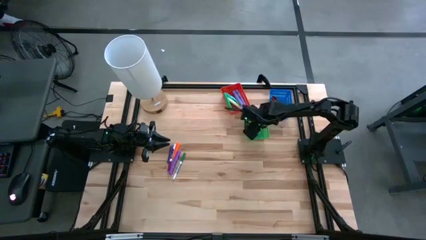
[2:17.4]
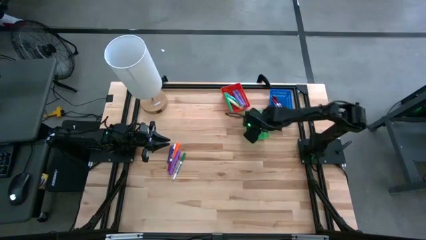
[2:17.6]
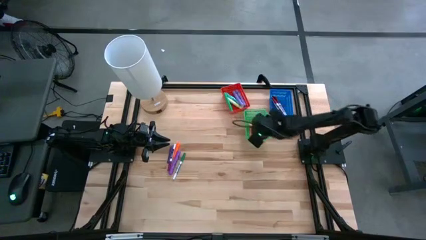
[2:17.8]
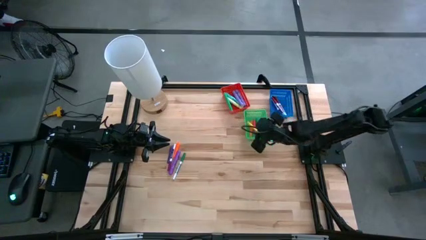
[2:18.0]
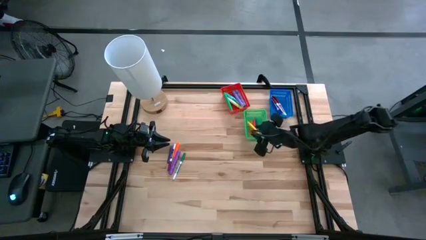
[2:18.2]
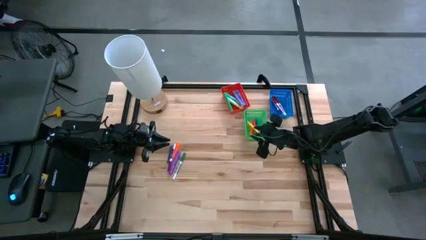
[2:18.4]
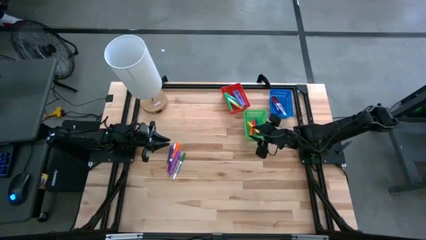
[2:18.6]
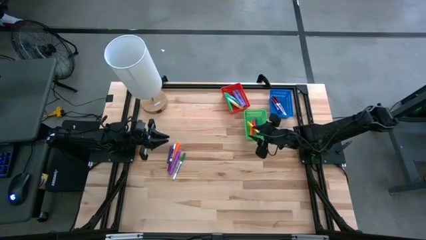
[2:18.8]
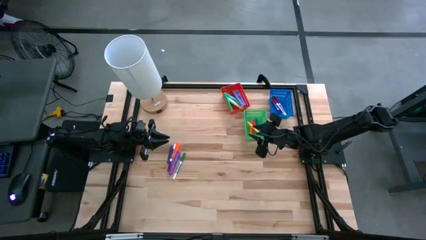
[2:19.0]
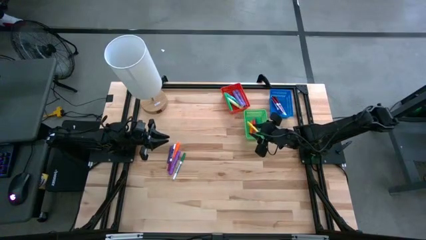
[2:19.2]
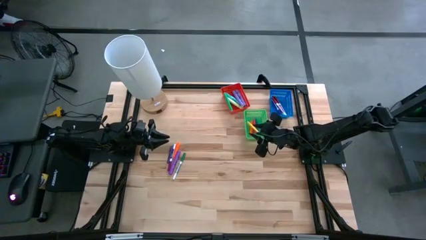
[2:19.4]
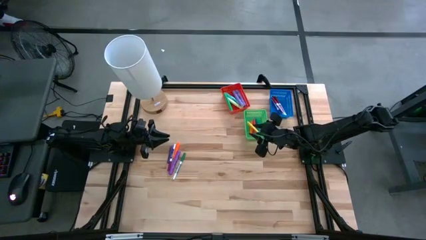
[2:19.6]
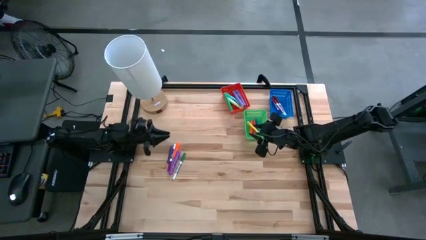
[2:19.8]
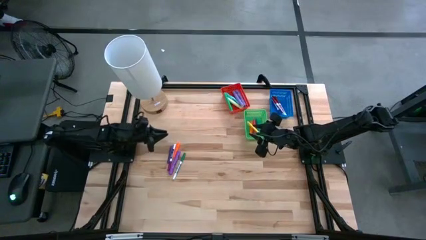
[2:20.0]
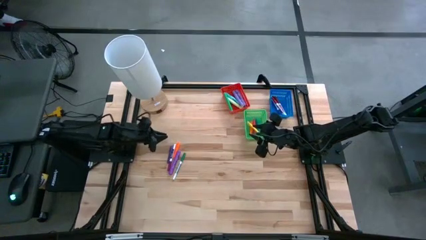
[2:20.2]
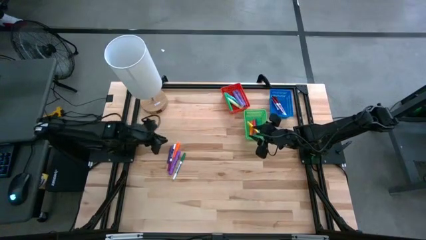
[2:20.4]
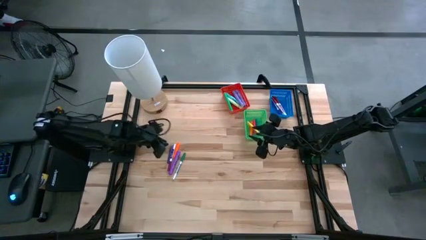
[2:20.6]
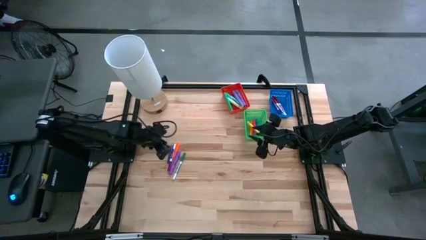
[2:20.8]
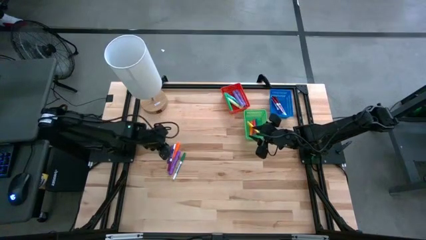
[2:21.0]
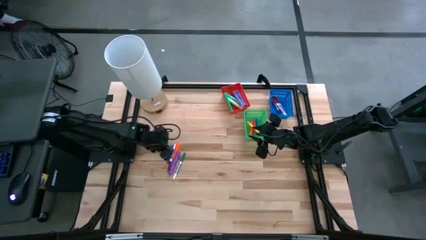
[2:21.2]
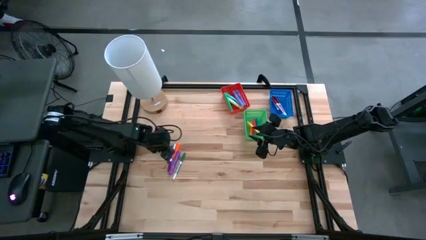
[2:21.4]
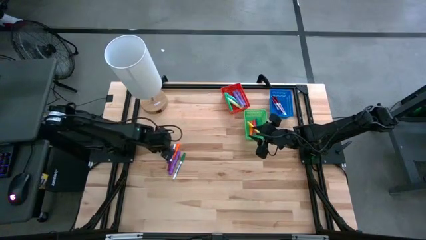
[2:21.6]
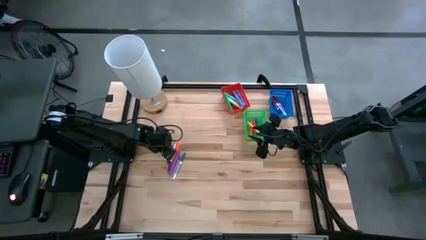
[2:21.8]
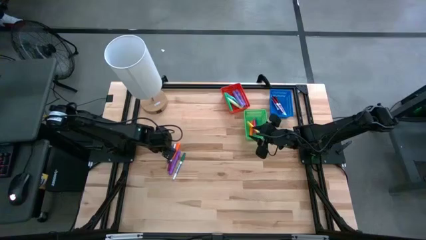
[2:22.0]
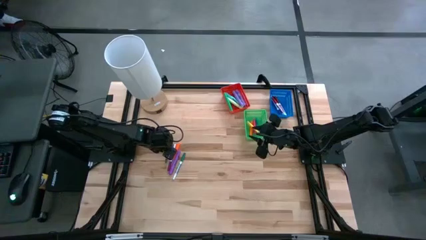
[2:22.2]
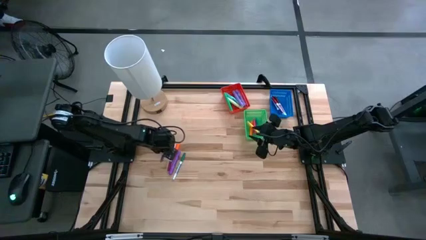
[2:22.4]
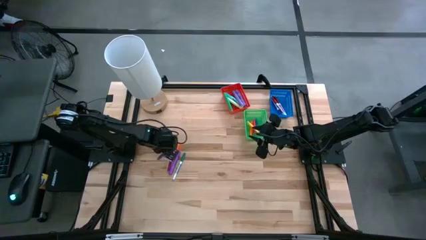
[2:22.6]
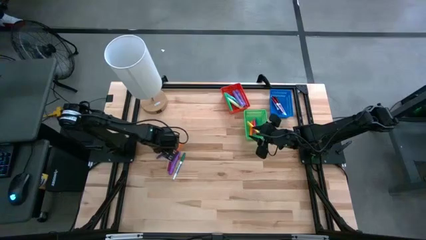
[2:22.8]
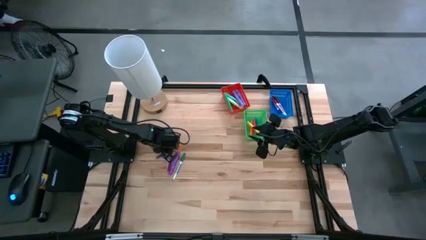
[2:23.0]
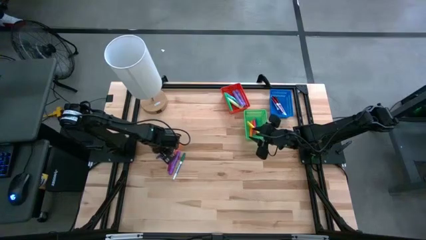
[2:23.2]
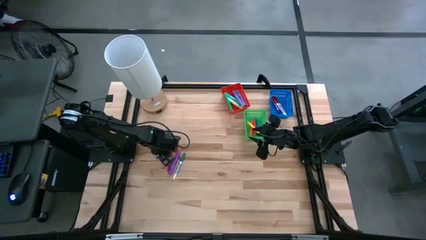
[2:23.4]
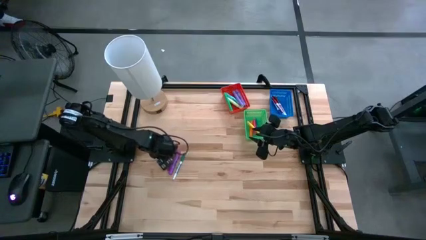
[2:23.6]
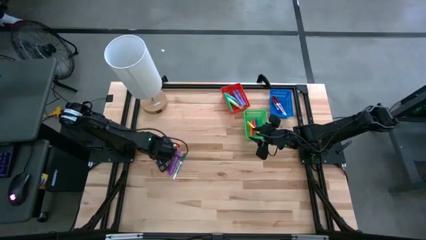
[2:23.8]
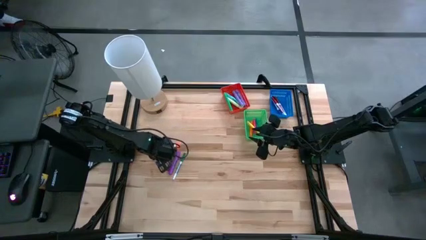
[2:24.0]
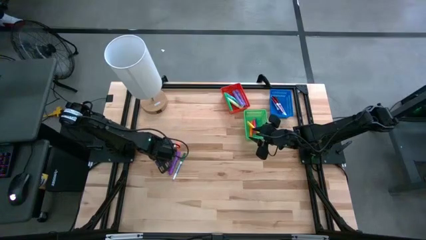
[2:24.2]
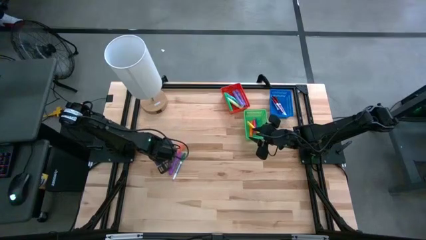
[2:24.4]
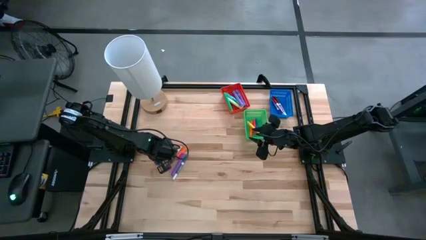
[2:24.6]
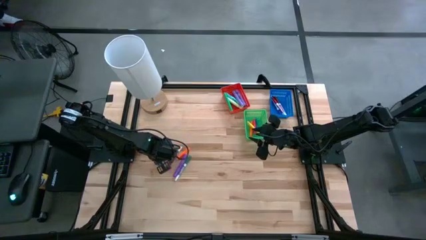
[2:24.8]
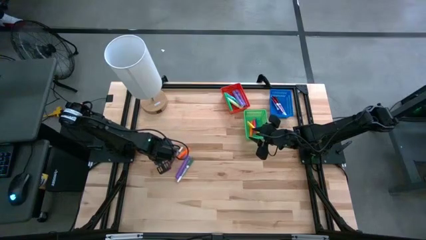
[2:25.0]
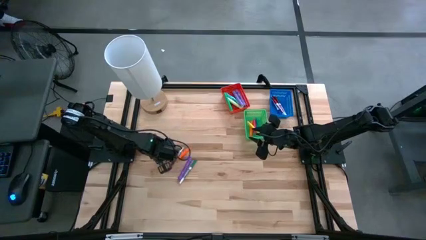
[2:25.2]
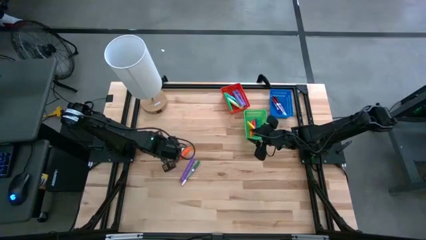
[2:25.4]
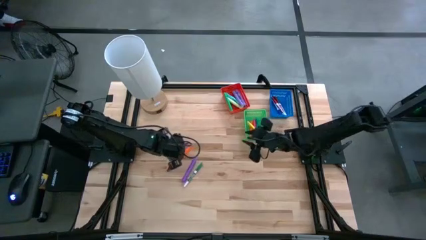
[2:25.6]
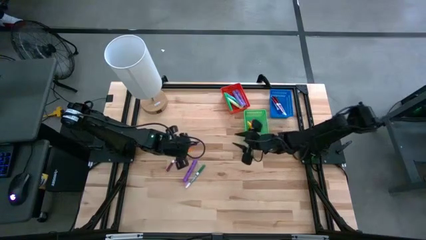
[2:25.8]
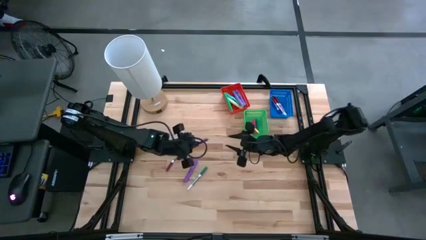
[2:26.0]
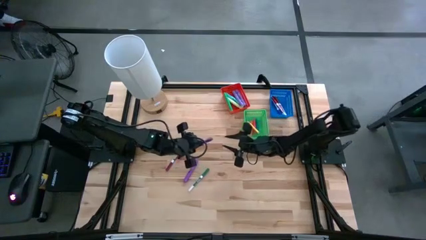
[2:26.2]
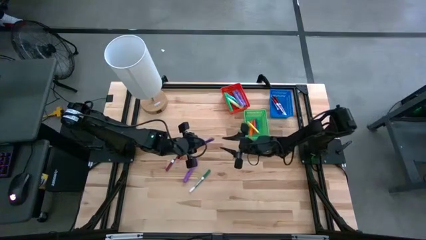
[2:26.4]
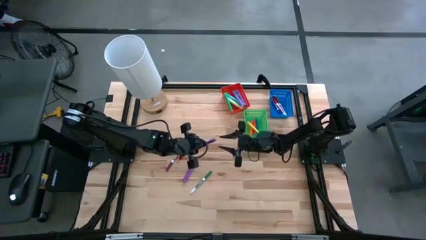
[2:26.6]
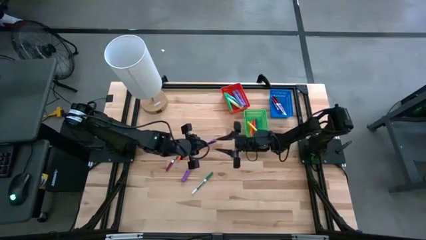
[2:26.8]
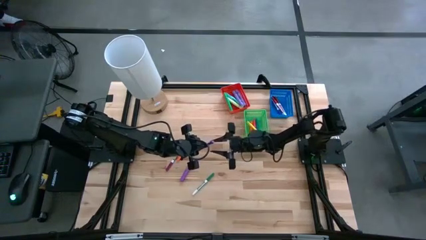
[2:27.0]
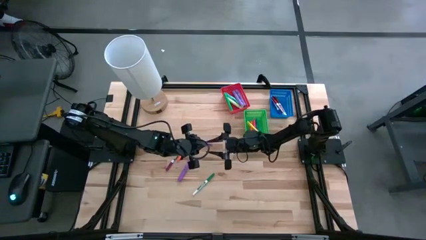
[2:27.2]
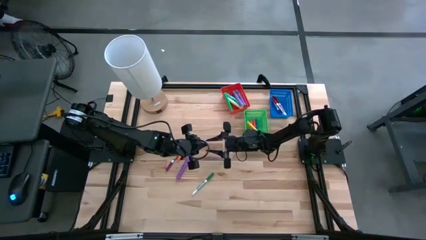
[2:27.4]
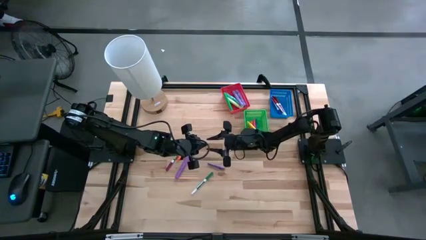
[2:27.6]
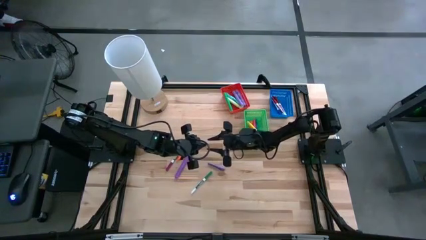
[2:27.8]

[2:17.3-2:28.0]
Task: Pick & Place Markers
Put the purple pen in the green bin

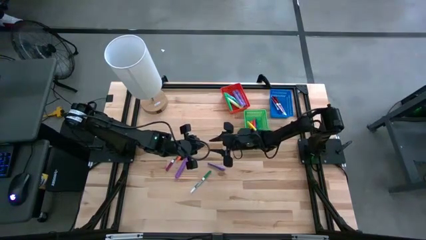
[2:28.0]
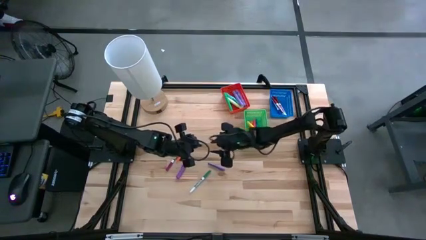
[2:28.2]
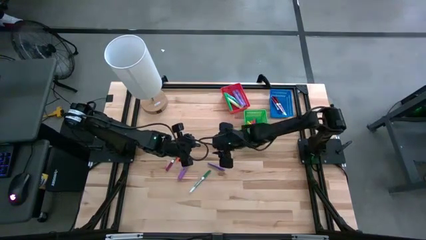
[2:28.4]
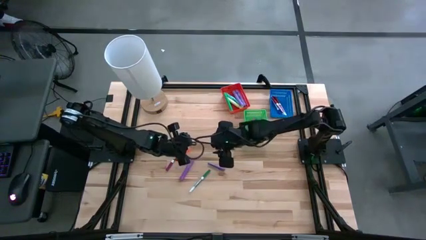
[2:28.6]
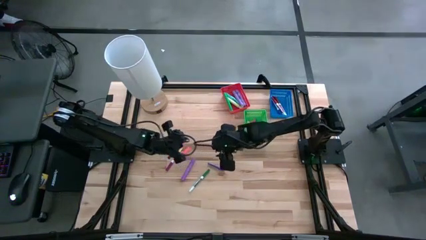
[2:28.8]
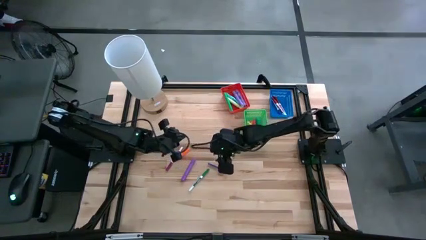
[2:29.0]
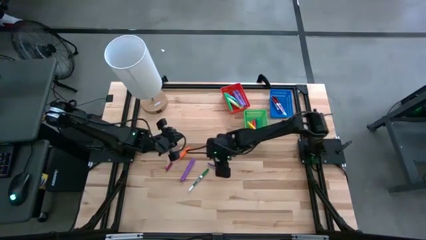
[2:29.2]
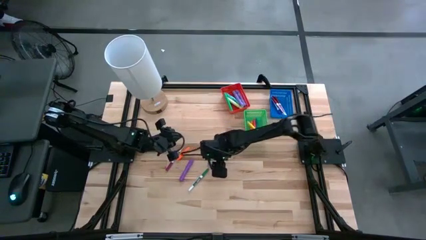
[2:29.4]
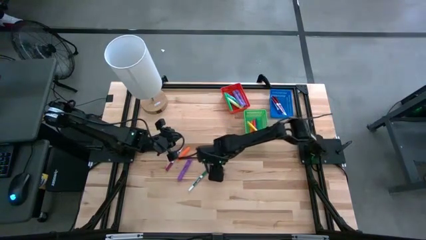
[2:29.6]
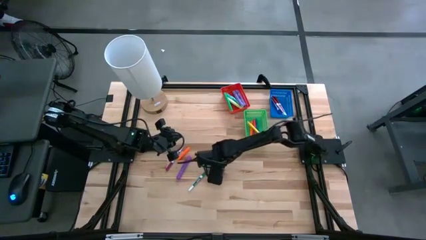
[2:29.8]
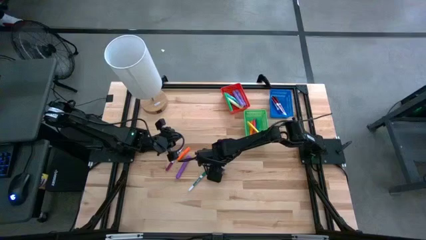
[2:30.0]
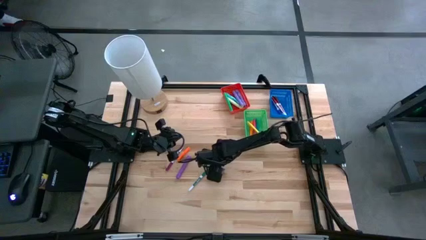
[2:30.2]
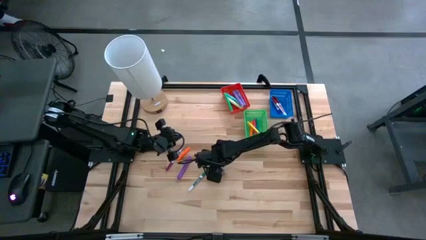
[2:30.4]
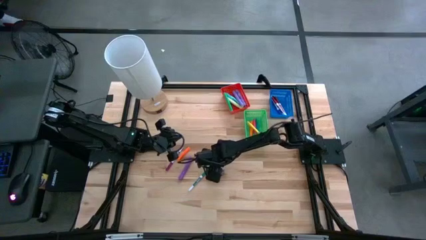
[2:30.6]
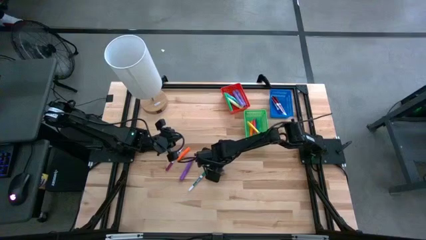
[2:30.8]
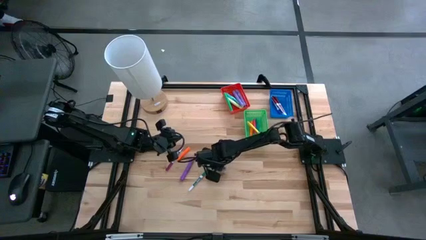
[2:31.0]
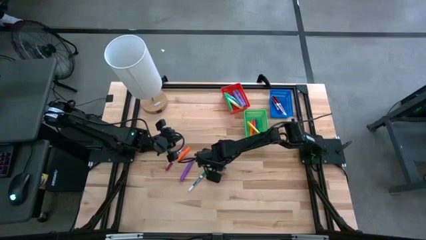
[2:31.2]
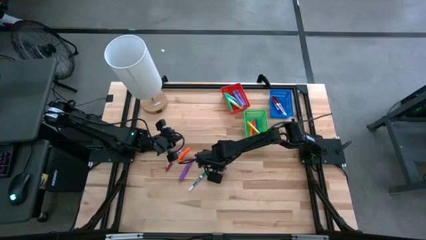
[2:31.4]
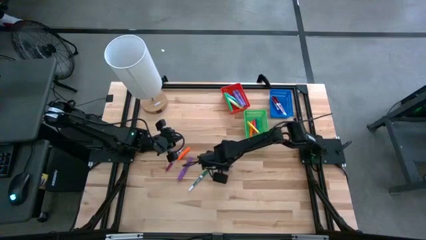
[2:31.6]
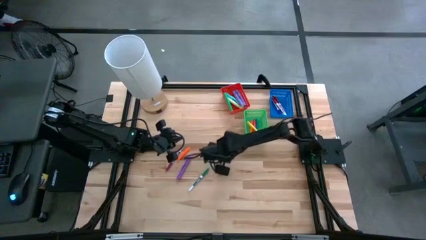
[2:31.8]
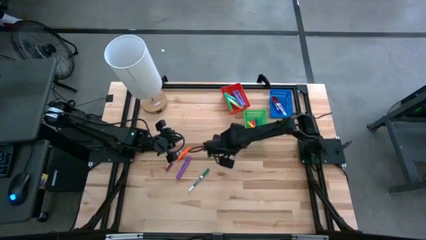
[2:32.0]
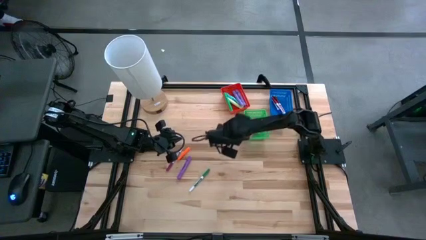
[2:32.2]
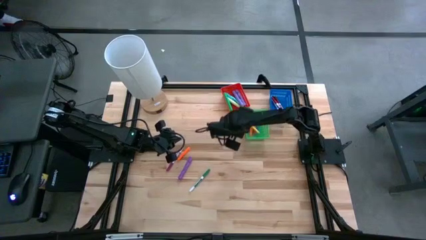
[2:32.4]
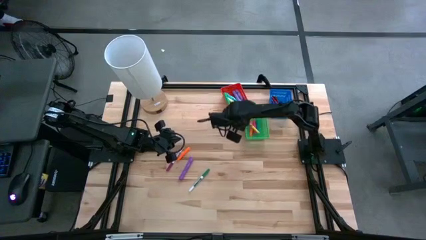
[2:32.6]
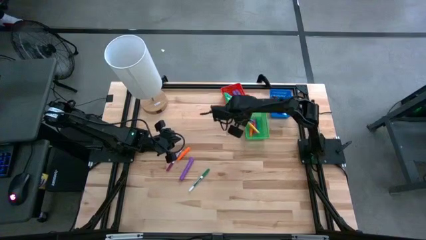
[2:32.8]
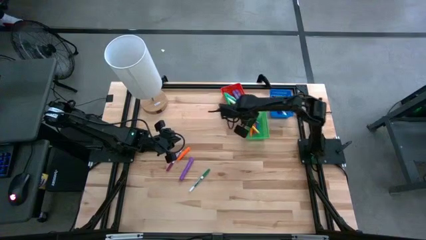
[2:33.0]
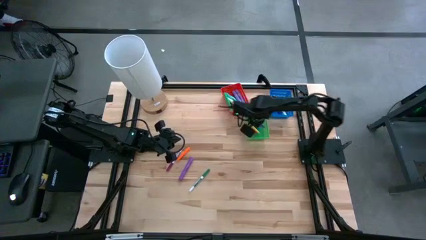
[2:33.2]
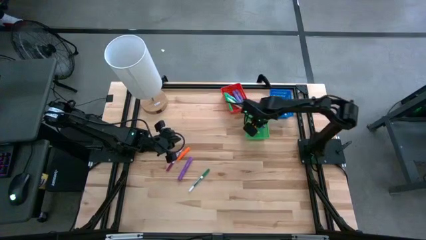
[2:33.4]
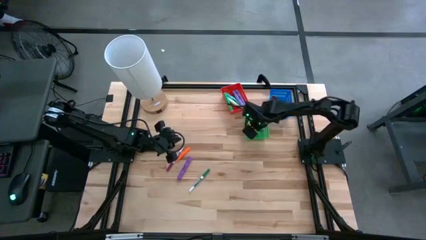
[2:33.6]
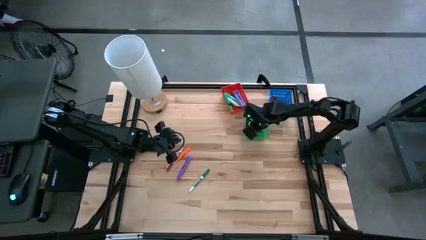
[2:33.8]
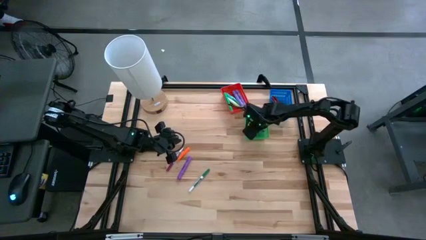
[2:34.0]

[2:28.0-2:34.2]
Put the purple pen in the green bin
